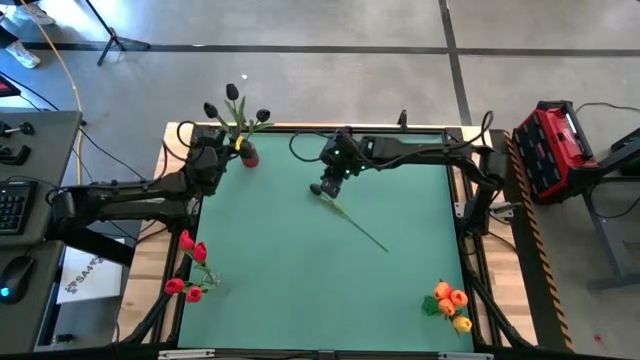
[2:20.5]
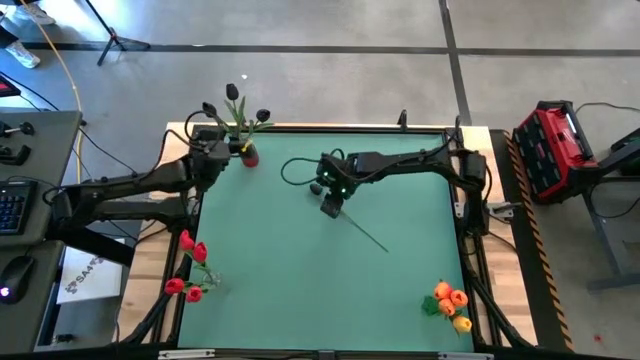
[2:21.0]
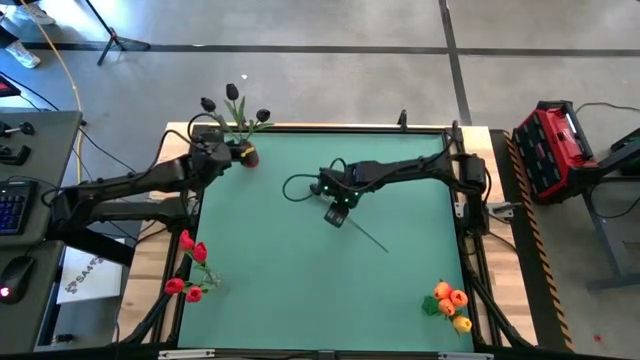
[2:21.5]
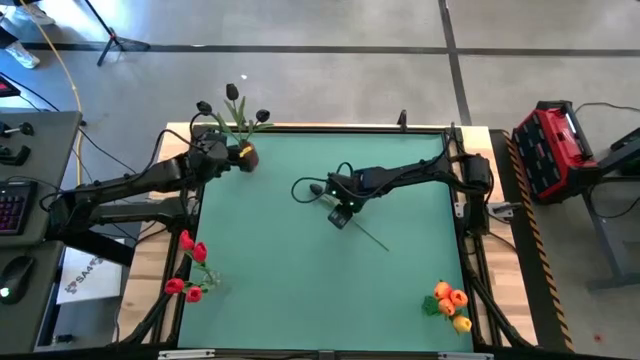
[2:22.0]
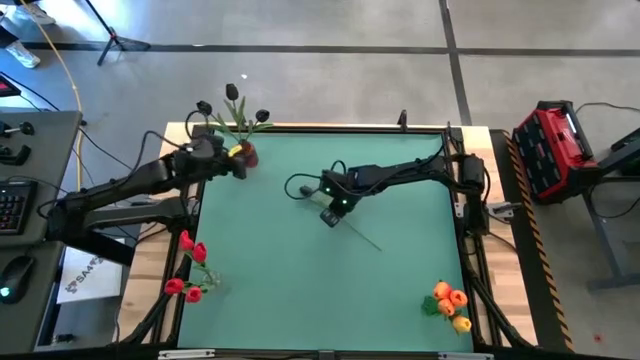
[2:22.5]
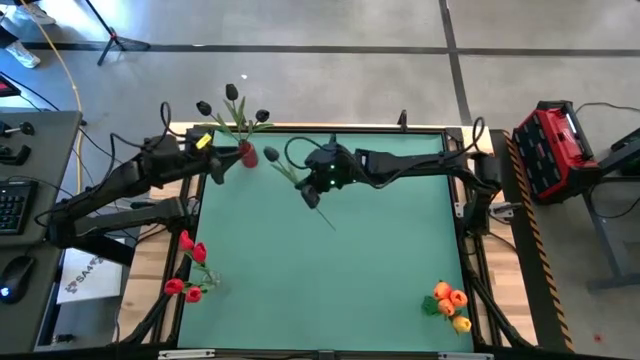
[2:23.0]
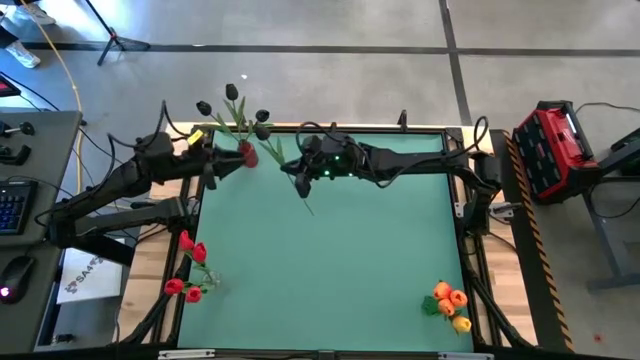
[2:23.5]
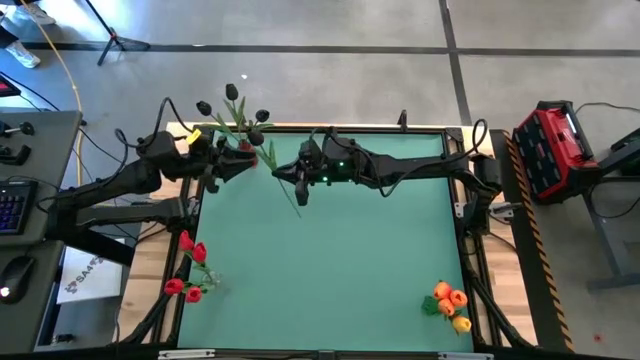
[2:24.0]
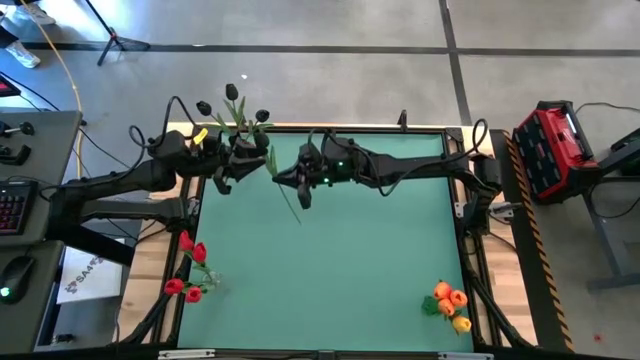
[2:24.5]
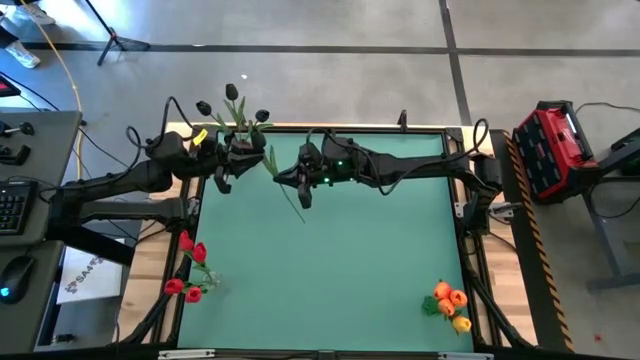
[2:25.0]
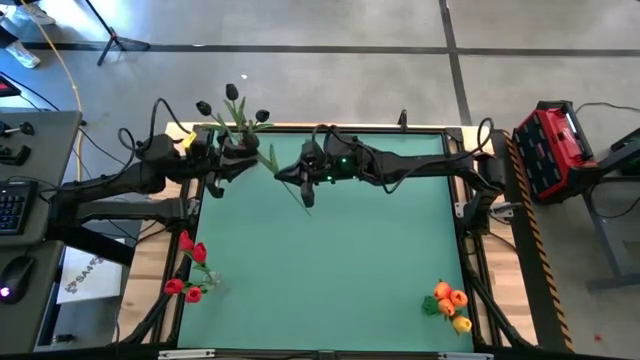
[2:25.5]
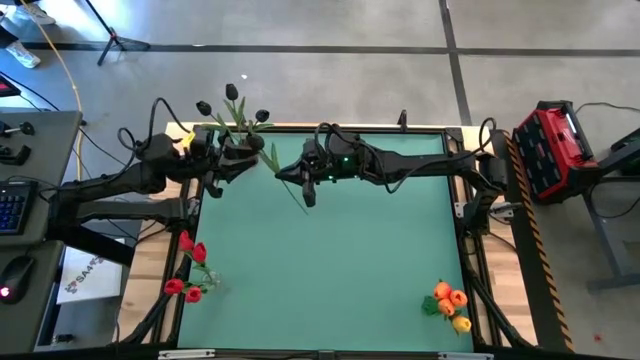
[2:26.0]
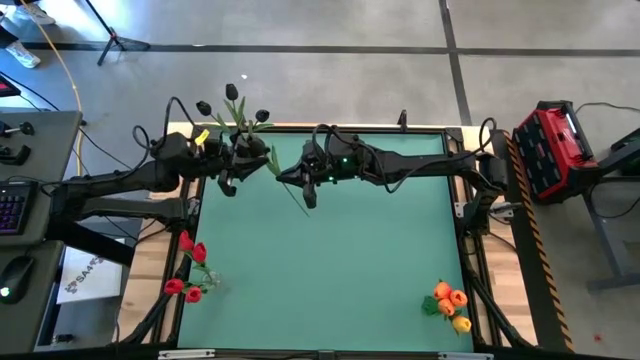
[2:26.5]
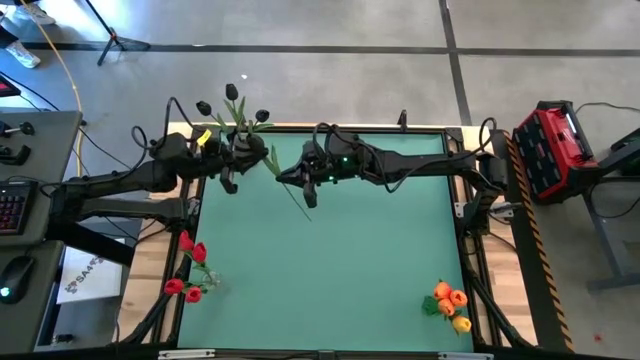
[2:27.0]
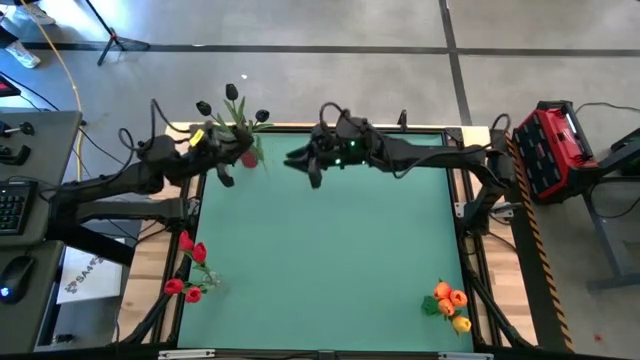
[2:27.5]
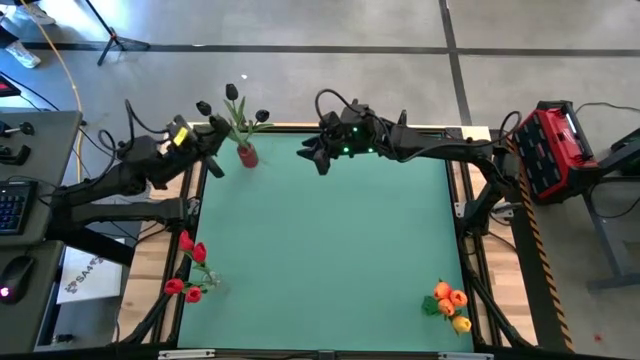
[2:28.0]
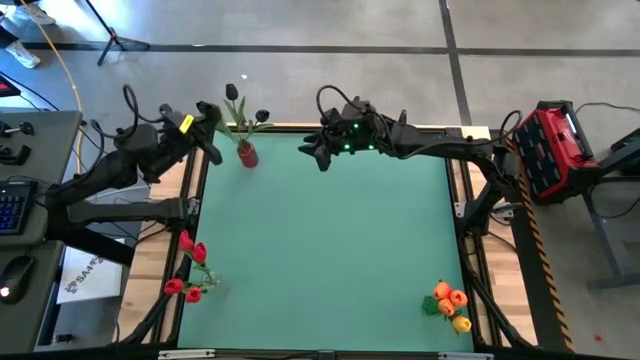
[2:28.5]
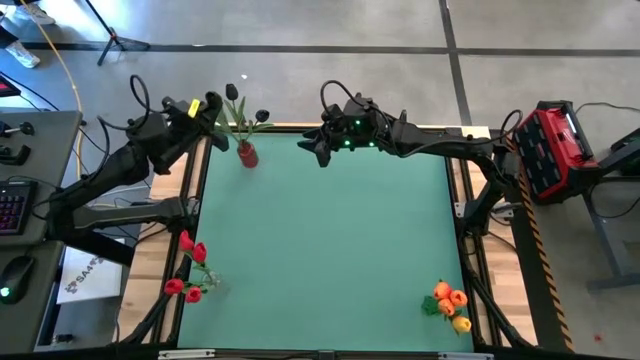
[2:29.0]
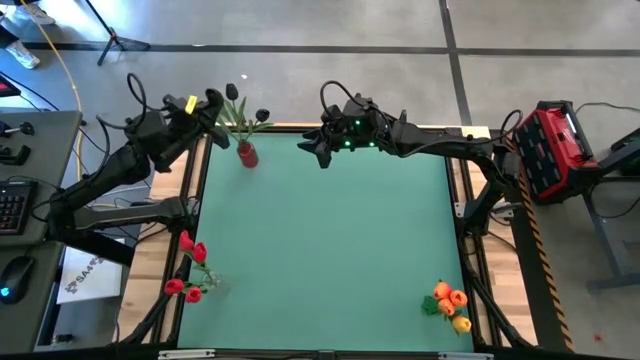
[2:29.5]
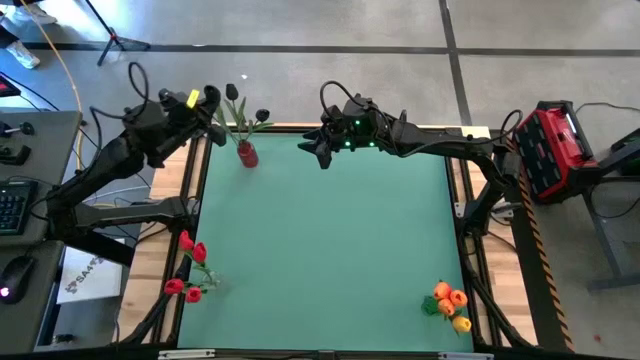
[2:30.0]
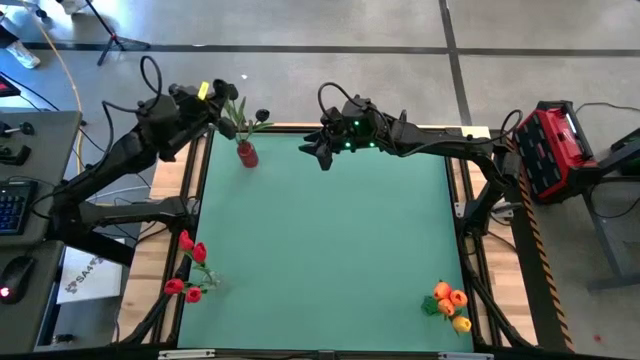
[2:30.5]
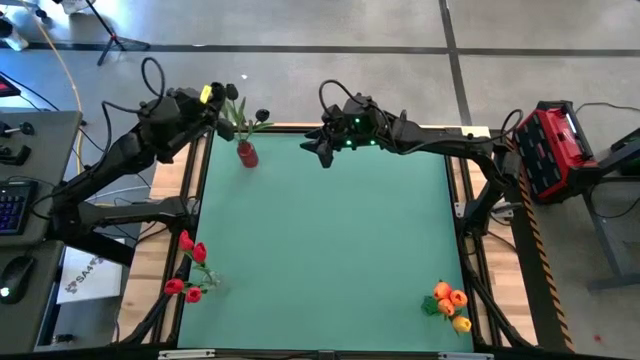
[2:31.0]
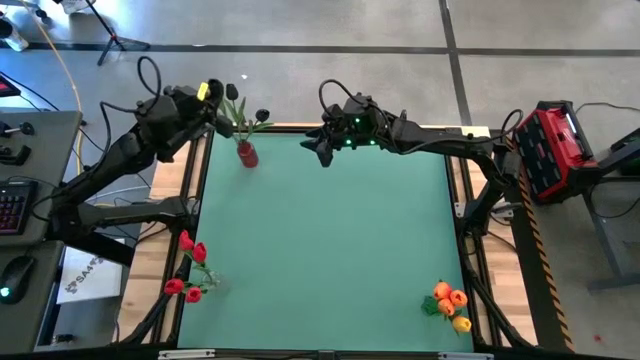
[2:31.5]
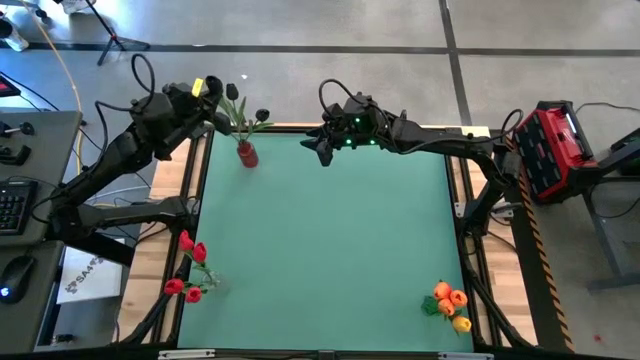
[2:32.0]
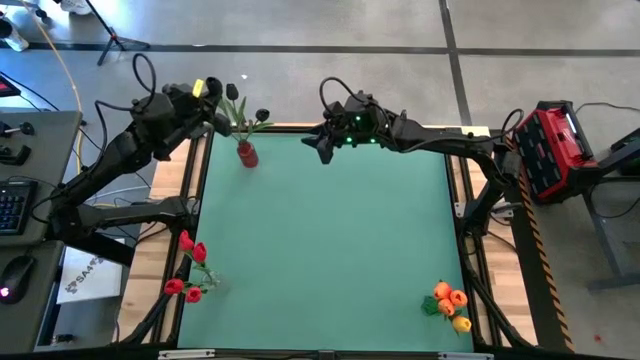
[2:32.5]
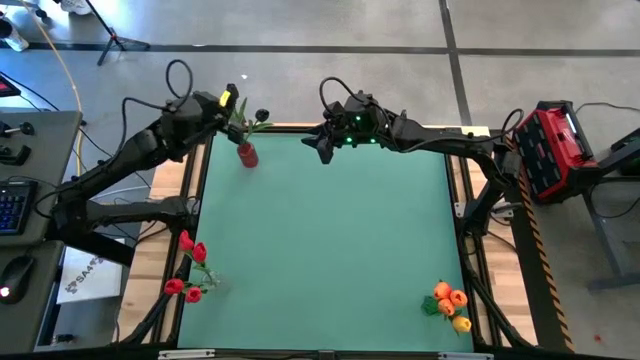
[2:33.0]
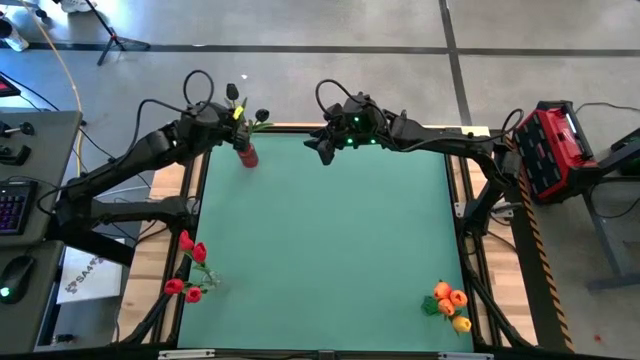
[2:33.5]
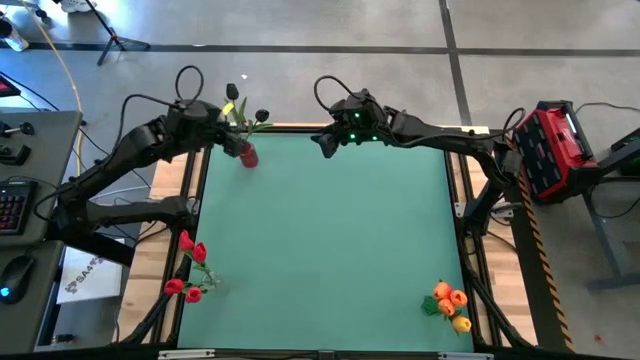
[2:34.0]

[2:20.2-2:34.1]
Task: Sort flowers into vase by color
Put the black flower into the red vase
